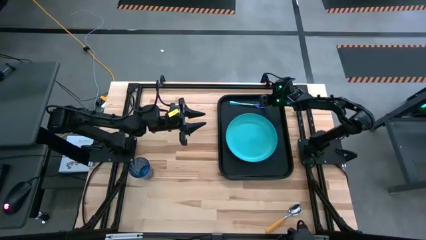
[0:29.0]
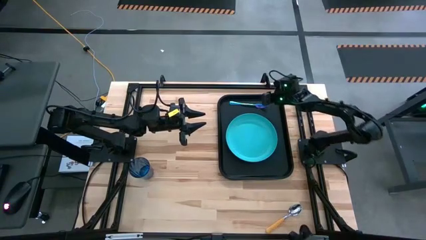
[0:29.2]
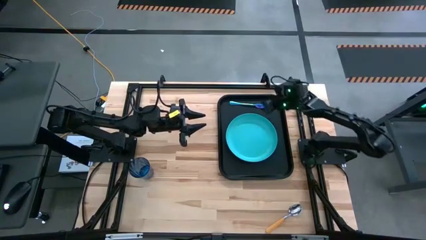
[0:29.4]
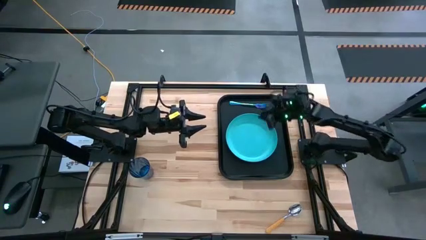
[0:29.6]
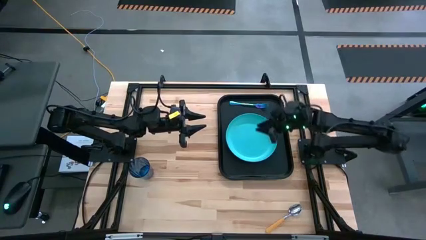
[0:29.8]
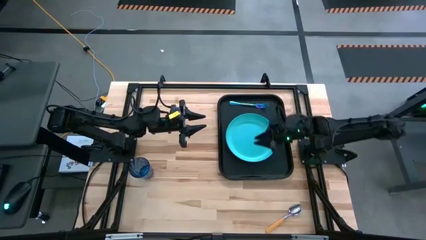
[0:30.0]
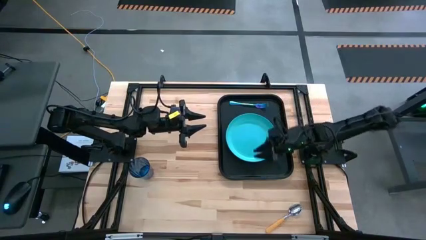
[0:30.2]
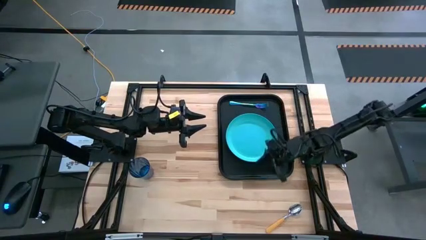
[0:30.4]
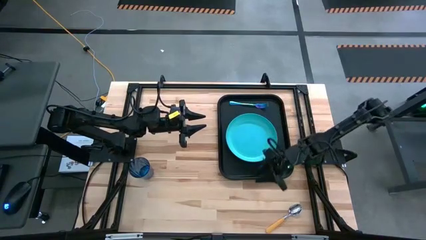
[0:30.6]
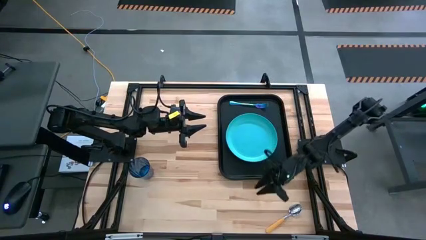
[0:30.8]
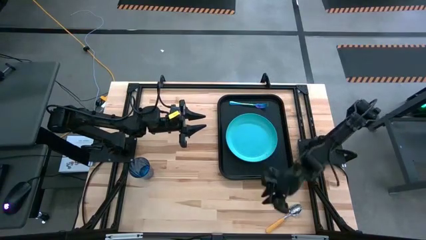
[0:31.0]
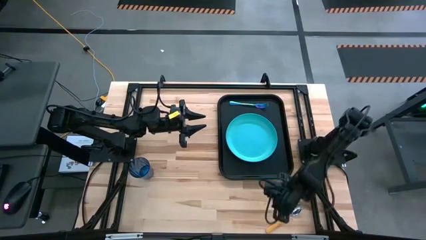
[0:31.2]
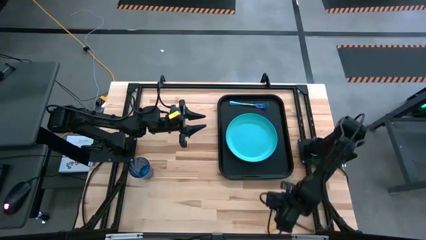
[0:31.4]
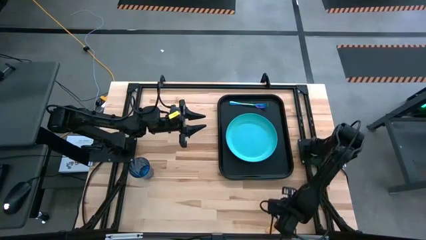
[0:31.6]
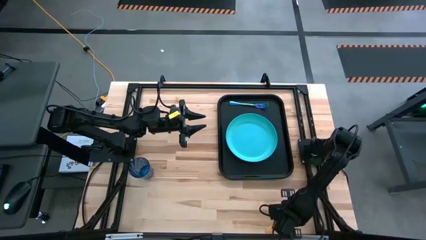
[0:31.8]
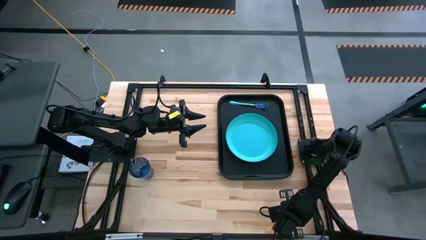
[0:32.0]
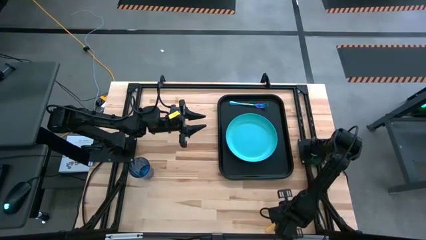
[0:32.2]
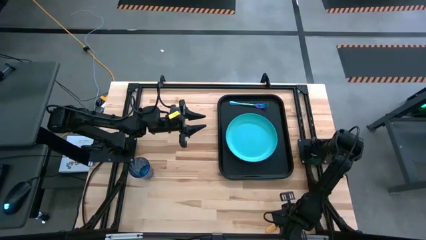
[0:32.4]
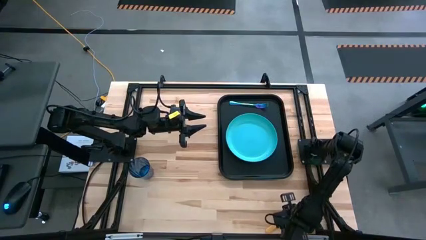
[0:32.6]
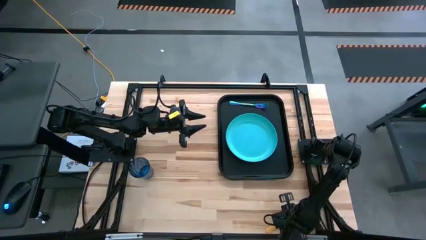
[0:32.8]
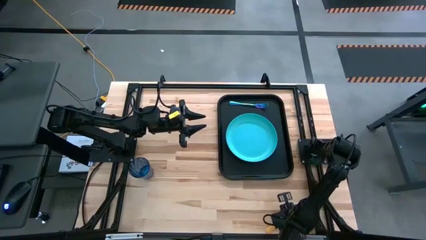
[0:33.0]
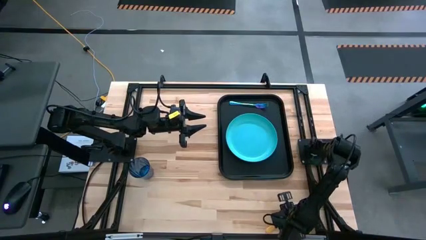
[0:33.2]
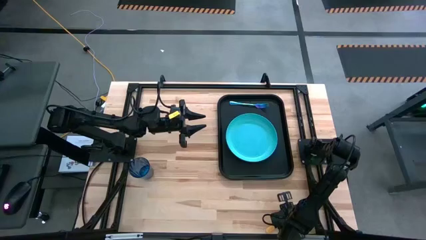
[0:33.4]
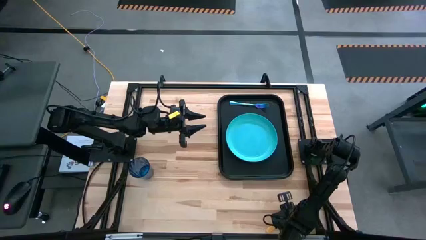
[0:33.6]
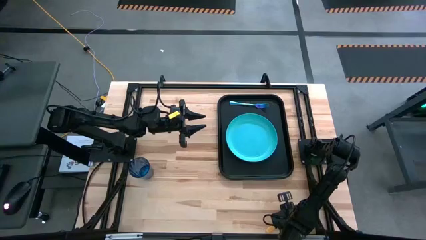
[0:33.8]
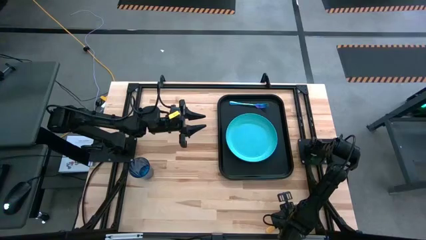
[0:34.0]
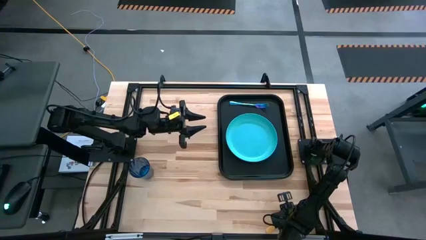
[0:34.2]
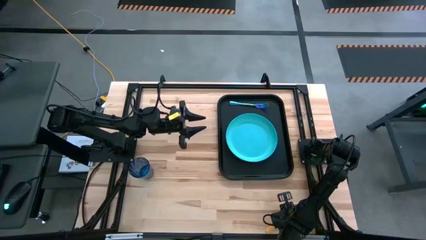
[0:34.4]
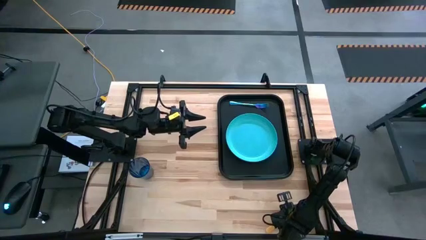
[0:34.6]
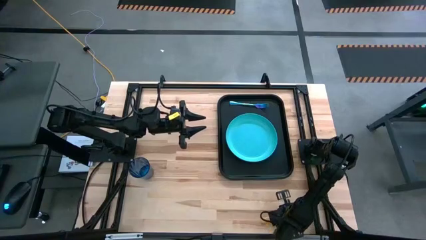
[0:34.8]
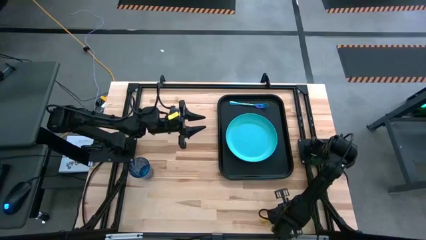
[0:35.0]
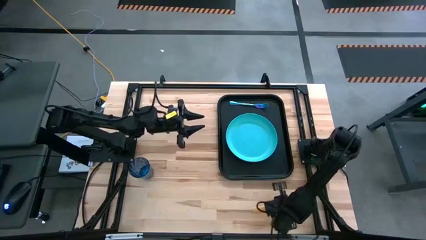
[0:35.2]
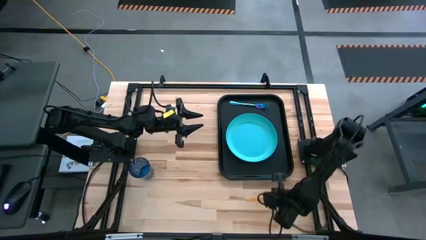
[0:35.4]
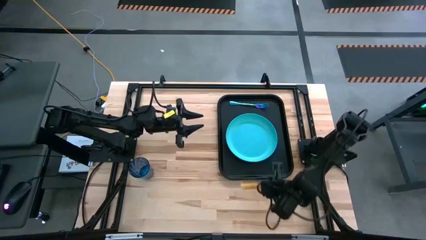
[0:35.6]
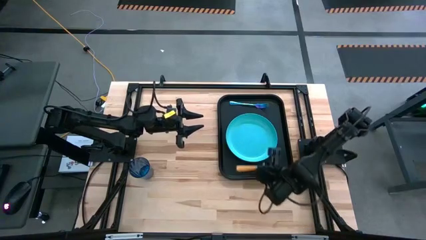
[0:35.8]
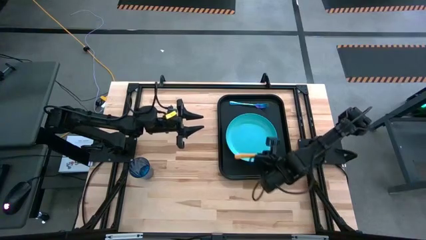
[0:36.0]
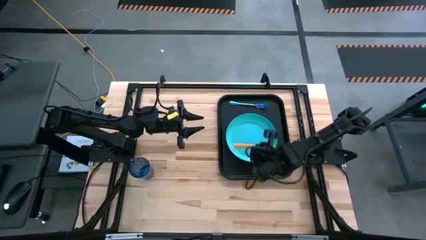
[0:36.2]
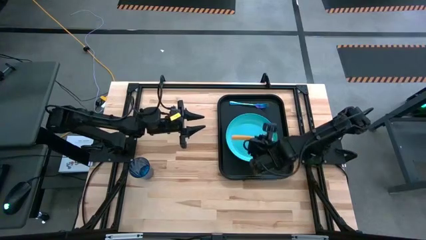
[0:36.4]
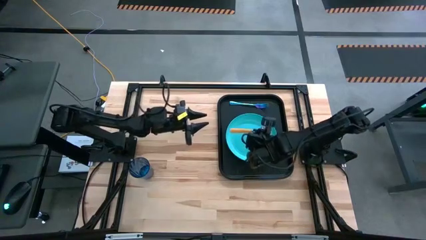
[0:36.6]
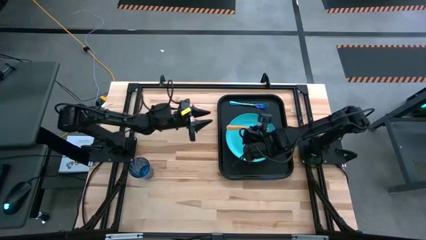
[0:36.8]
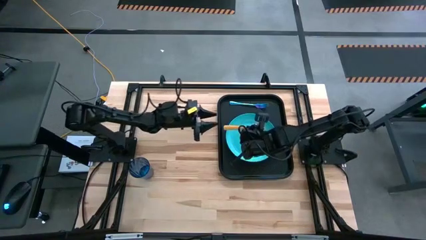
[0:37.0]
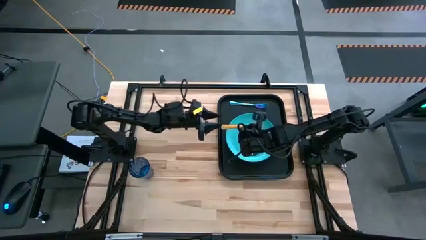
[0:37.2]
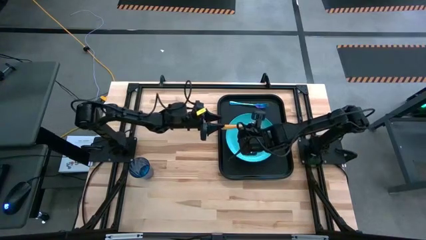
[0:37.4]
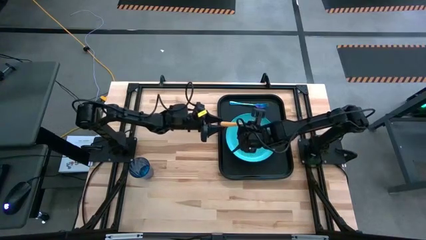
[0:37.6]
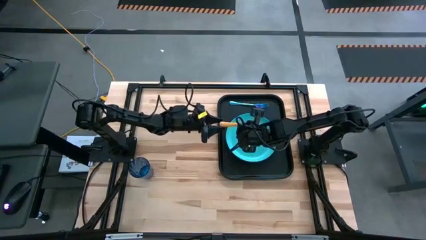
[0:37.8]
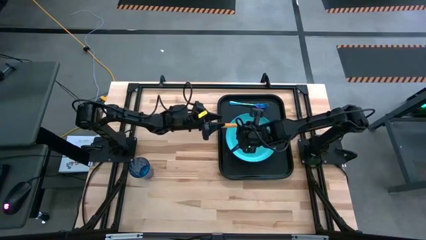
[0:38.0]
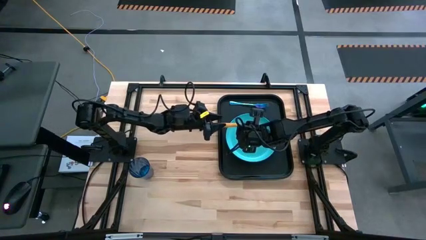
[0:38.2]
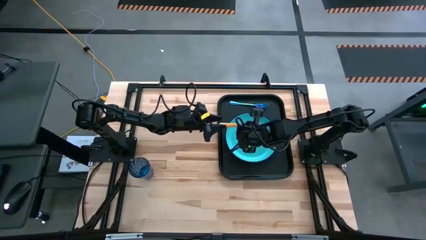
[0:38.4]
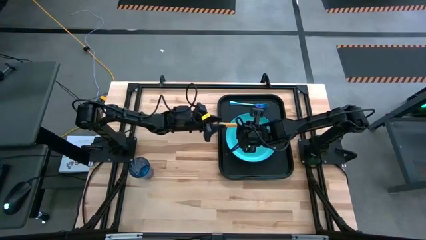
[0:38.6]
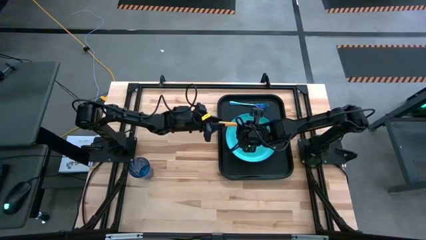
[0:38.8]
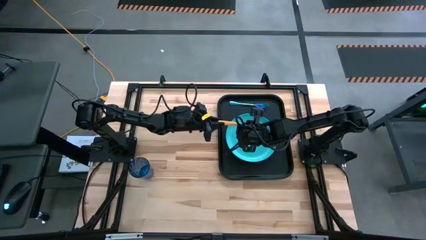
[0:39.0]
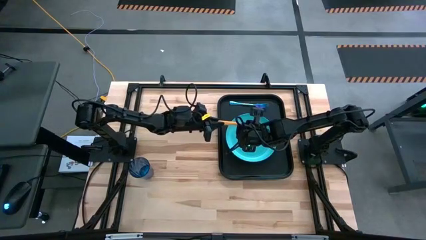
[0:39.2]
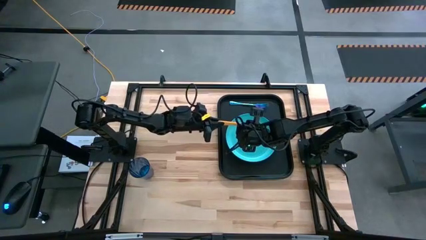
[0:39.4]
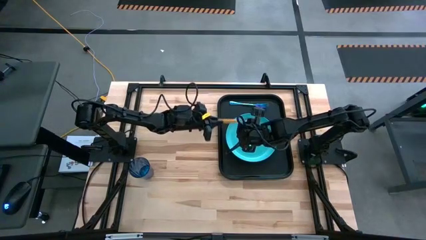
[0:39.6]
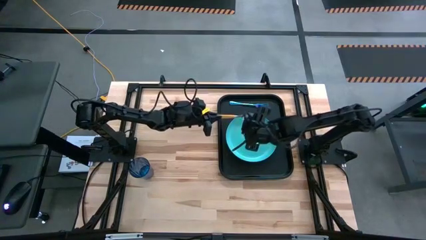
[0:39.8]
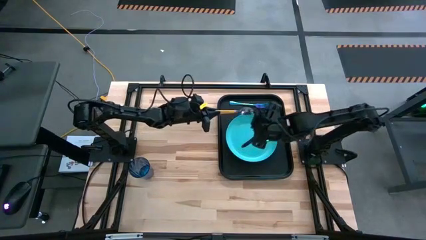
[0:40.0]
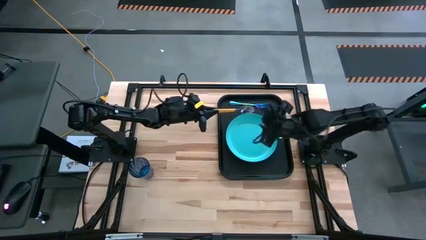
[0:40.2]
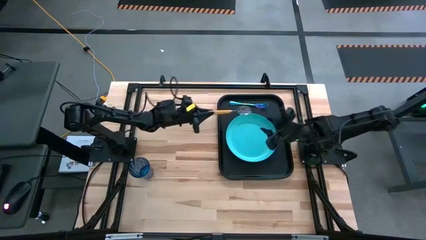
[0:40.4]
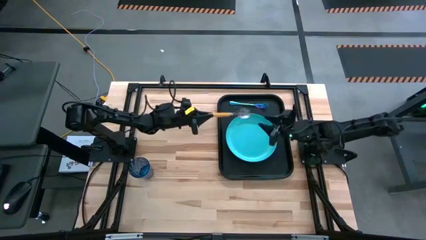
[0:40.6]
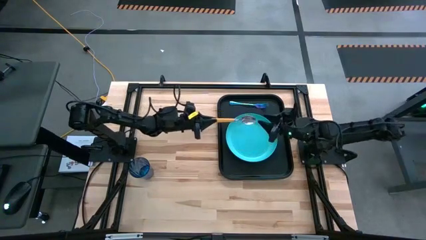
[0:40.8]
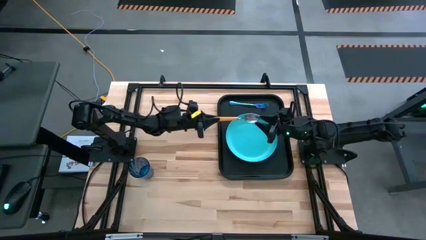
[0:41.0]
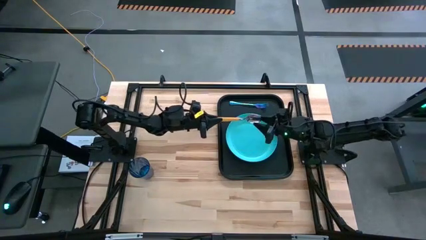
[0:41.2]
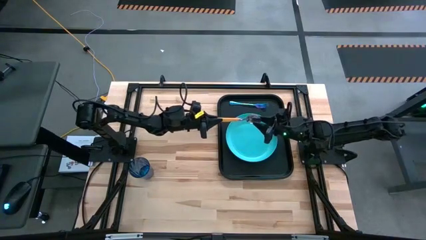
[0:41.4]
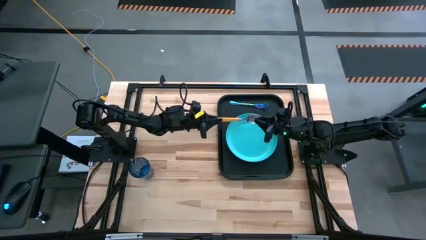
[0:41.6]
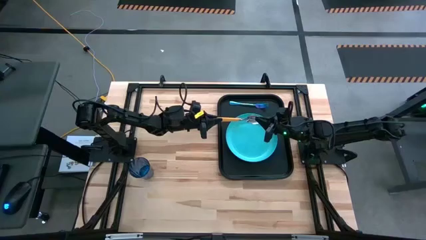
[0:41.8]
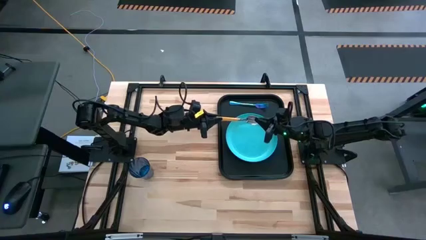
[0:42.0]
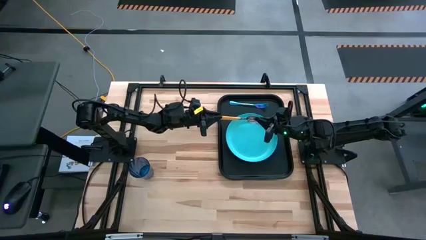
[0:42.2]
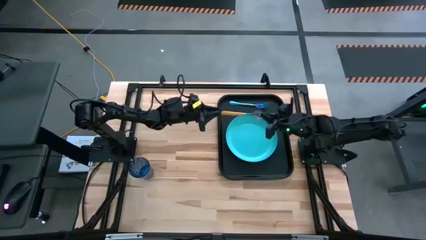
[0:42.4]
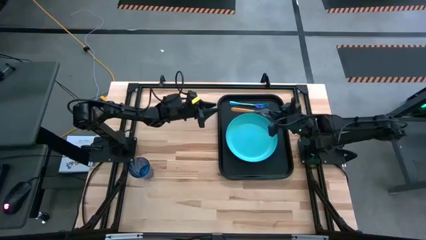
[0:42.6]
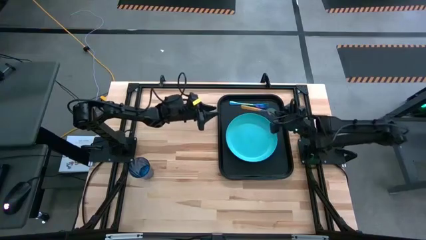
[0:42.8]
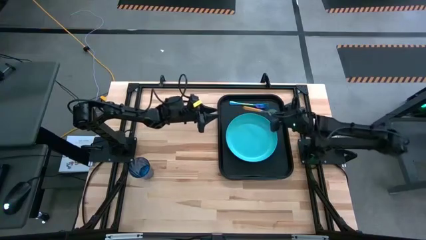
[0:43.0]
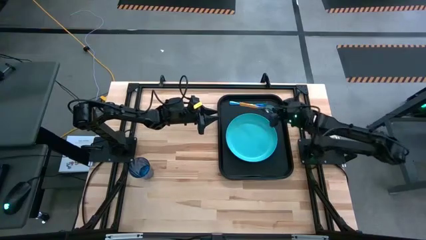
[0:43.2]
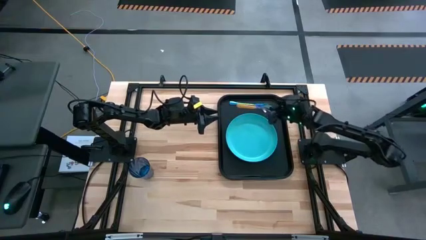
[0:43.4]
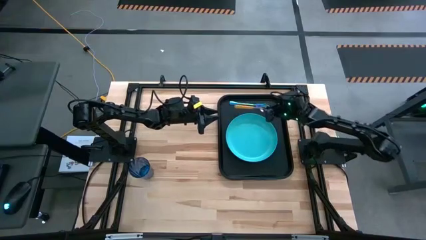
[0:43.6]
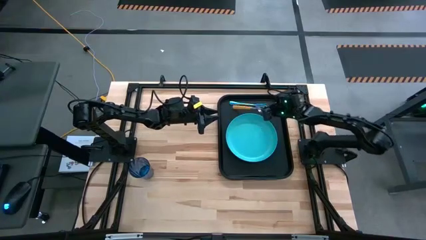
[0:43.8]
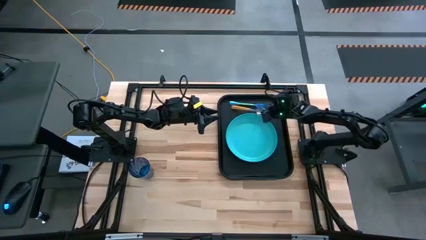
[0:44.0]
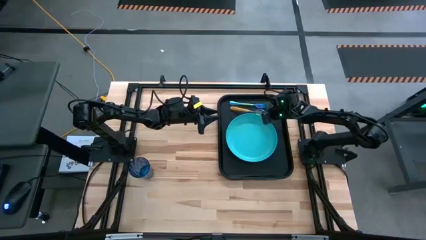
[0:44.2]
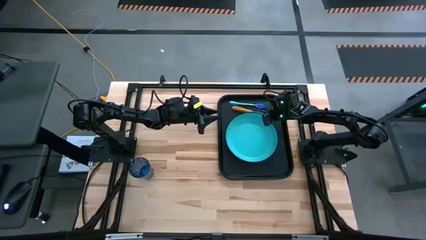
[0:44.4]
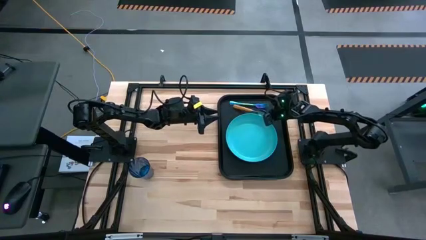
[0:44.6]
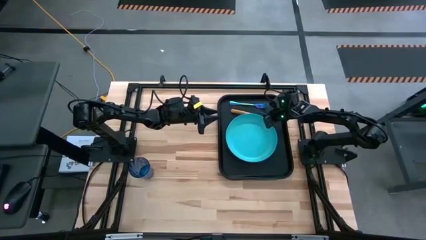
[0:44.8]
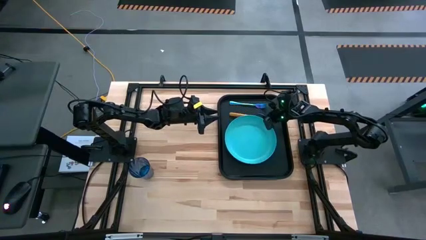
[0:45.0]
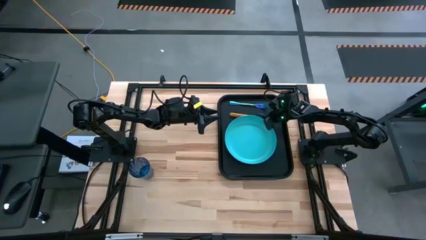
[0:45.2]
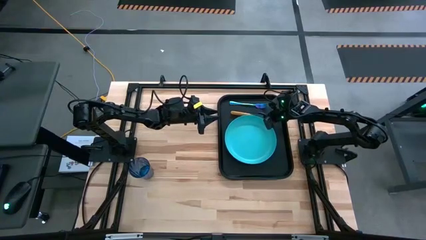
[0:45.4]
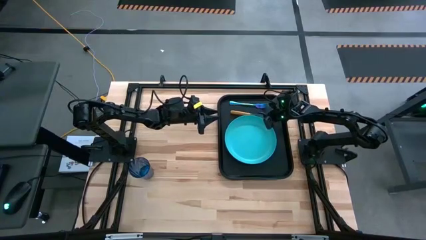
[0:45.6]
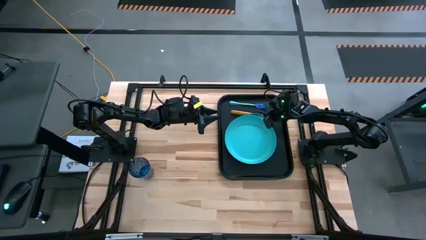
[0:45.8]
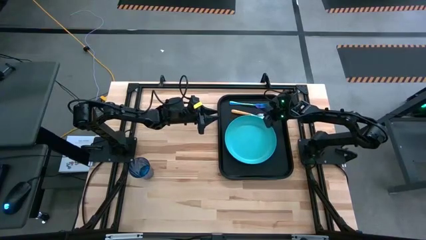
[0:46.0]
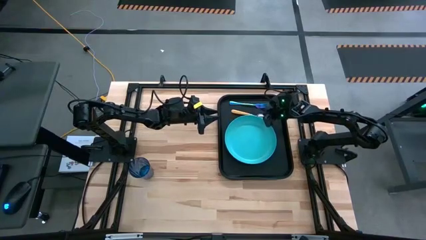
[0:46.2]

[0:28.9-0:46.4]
Task: Pick and place plate/cup/fork/spoon on tray
Put the yellow spoon on the black serving tray to the left side of the blue plate
